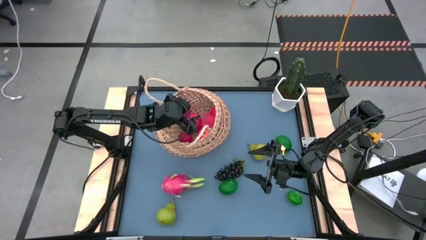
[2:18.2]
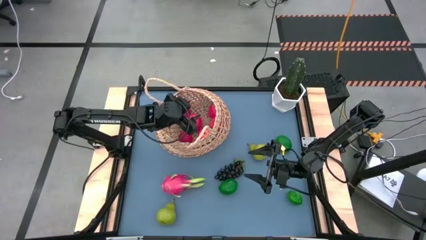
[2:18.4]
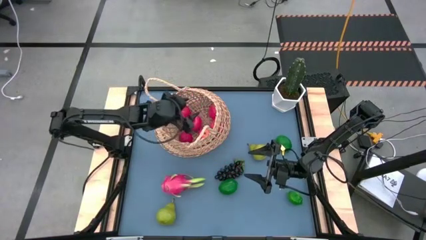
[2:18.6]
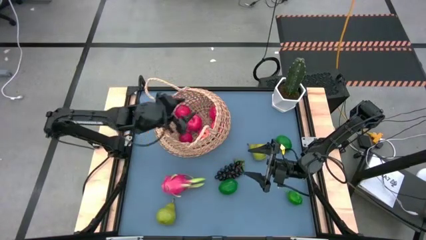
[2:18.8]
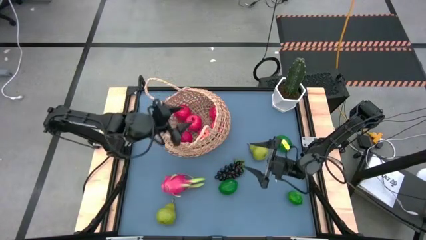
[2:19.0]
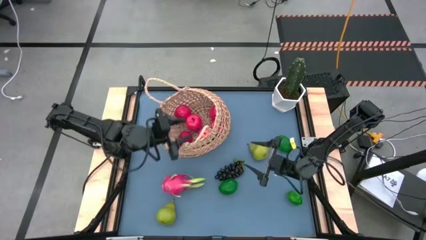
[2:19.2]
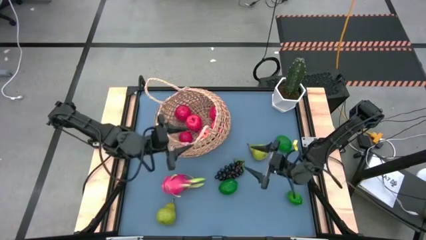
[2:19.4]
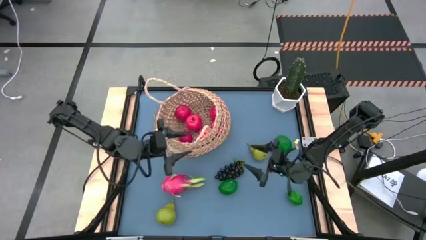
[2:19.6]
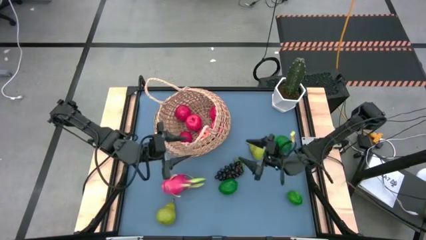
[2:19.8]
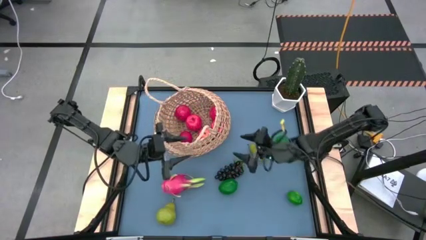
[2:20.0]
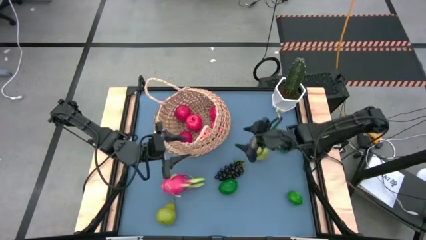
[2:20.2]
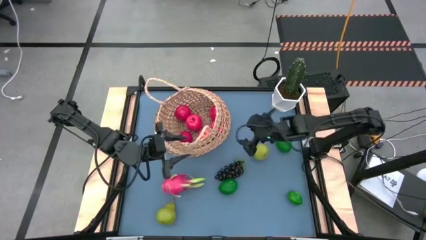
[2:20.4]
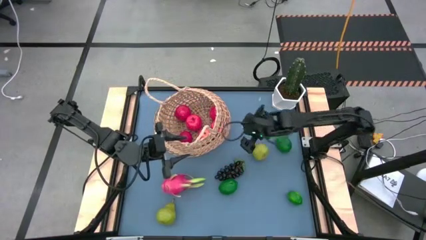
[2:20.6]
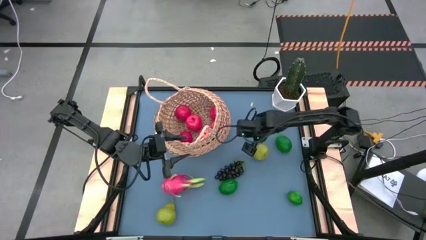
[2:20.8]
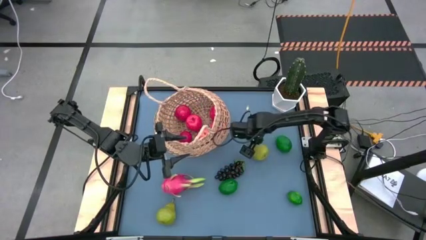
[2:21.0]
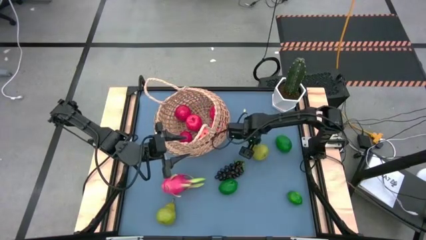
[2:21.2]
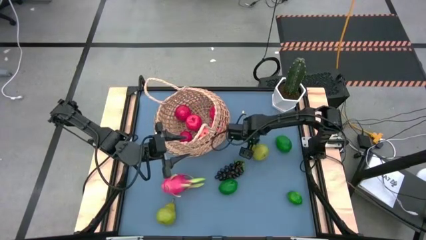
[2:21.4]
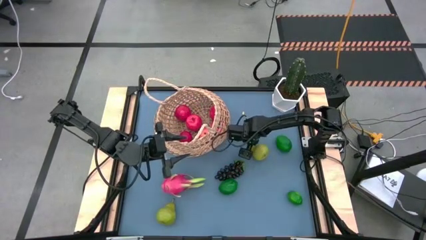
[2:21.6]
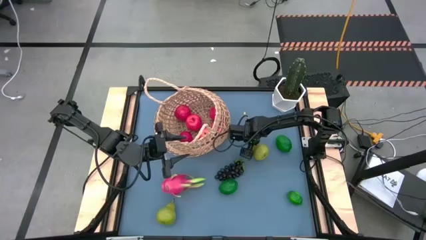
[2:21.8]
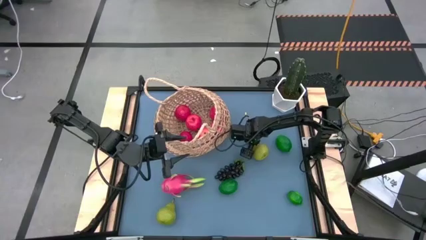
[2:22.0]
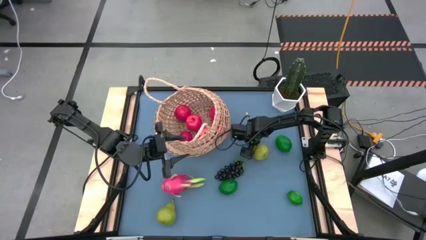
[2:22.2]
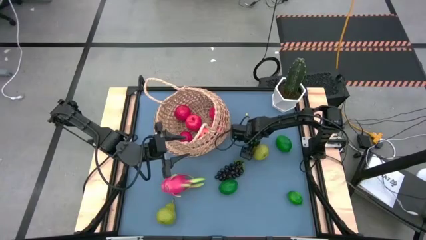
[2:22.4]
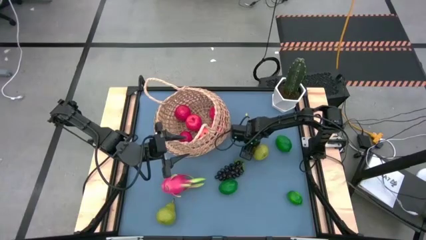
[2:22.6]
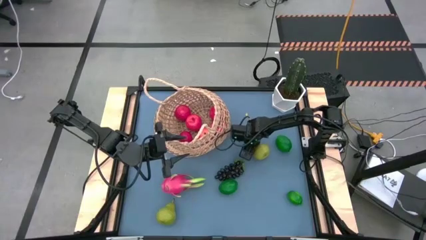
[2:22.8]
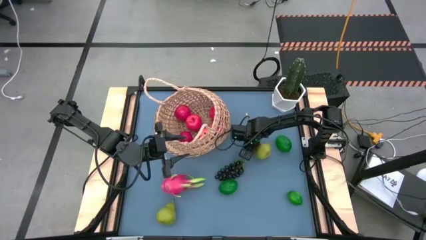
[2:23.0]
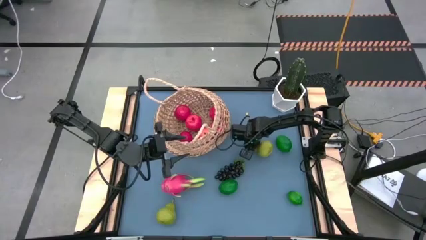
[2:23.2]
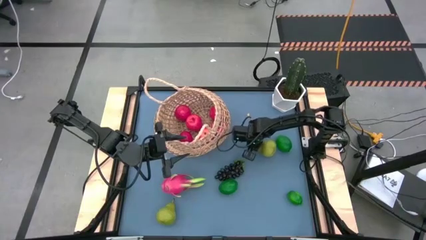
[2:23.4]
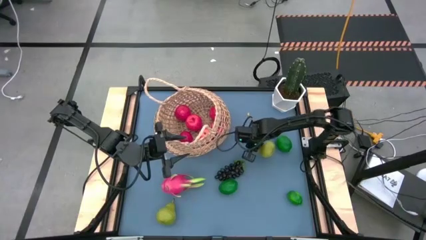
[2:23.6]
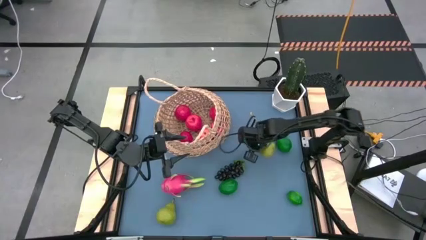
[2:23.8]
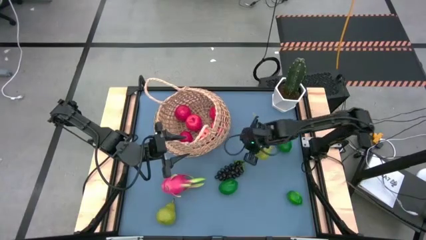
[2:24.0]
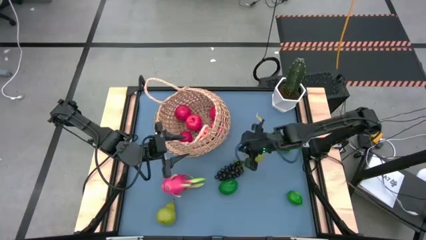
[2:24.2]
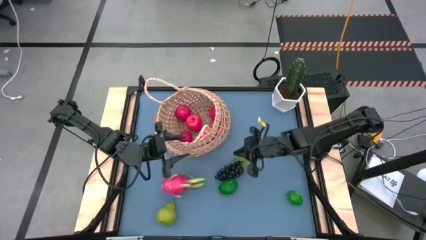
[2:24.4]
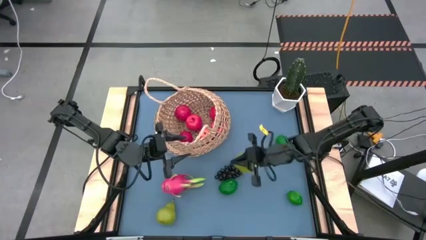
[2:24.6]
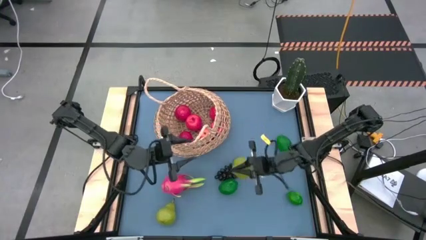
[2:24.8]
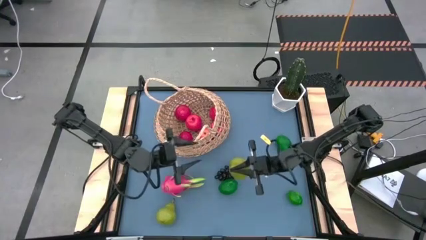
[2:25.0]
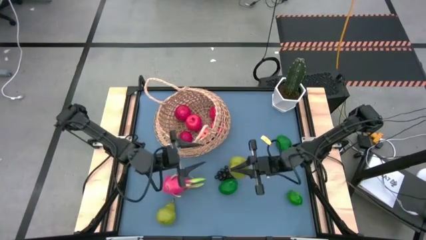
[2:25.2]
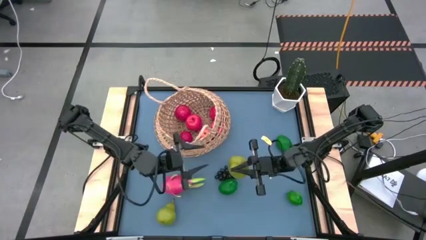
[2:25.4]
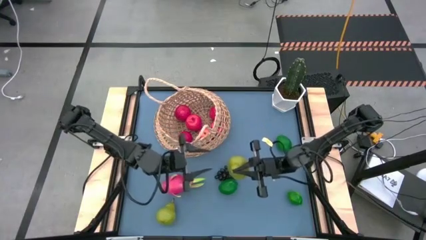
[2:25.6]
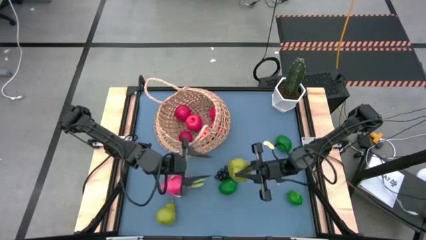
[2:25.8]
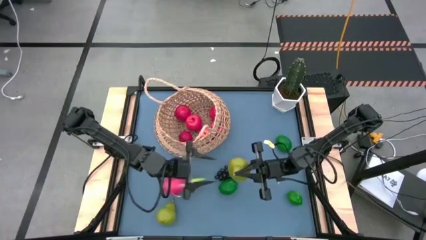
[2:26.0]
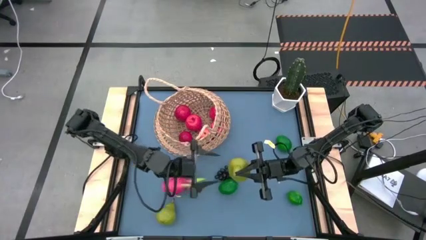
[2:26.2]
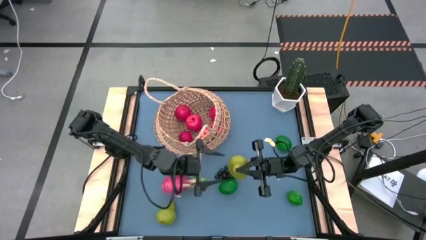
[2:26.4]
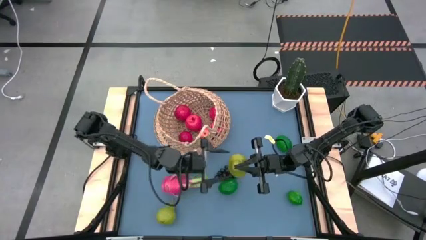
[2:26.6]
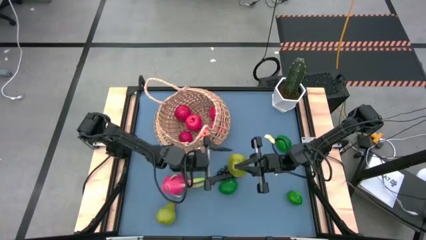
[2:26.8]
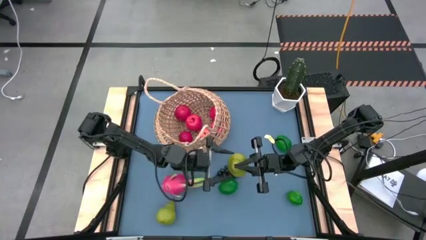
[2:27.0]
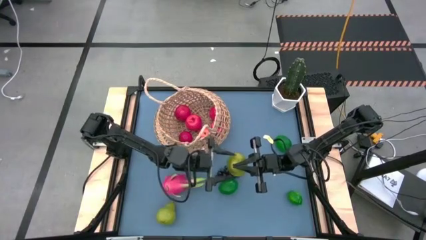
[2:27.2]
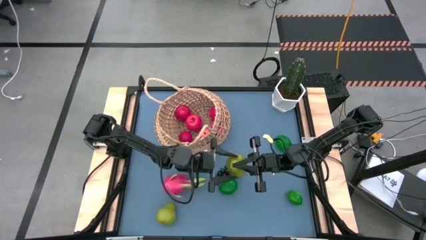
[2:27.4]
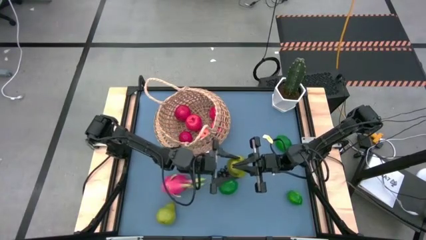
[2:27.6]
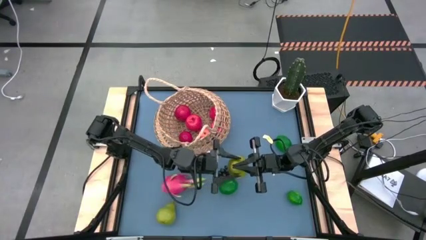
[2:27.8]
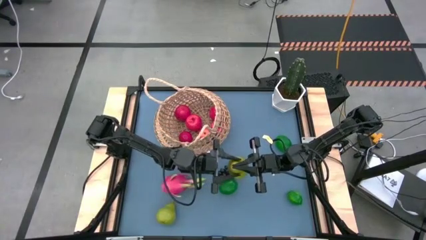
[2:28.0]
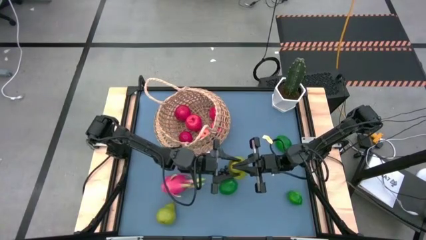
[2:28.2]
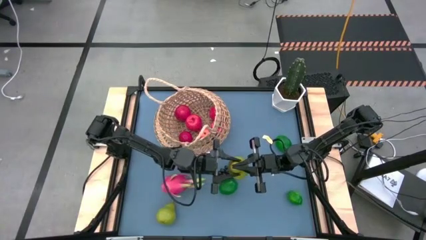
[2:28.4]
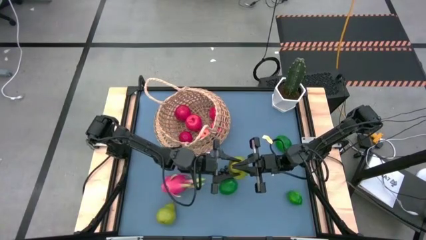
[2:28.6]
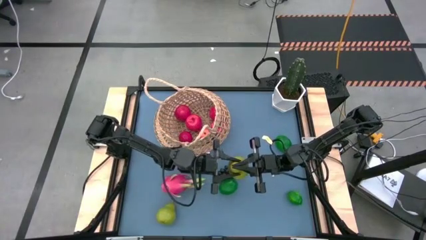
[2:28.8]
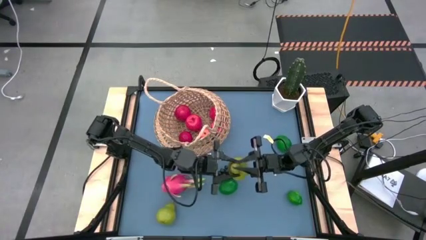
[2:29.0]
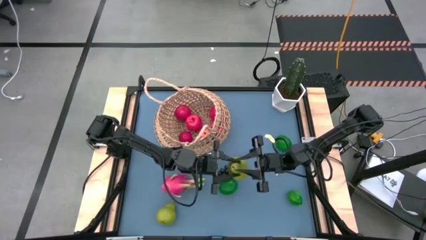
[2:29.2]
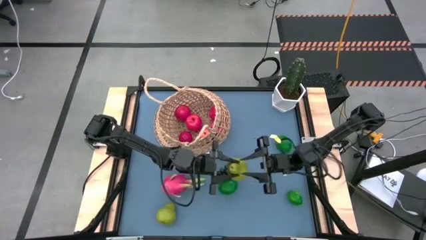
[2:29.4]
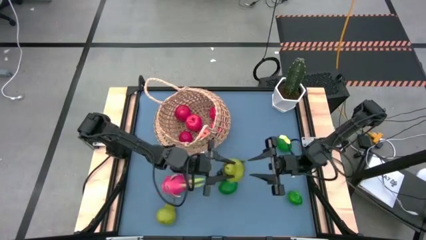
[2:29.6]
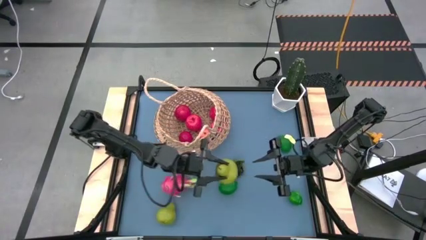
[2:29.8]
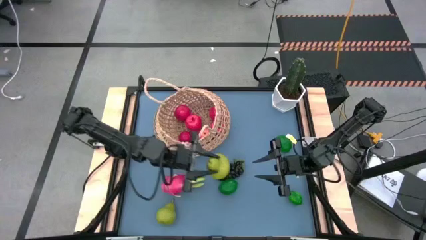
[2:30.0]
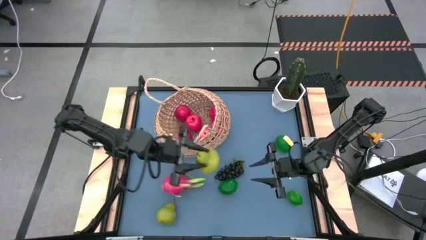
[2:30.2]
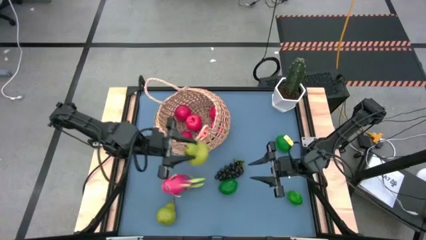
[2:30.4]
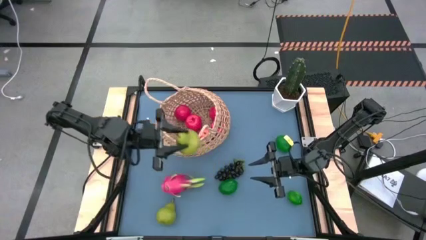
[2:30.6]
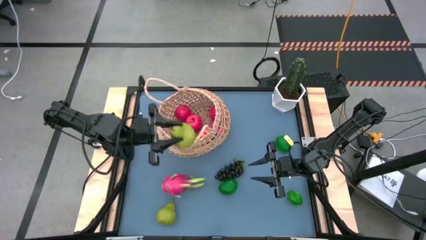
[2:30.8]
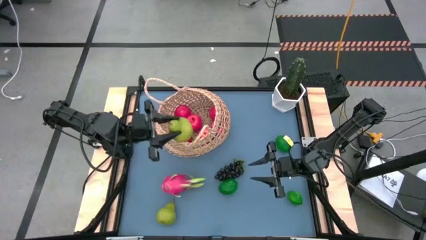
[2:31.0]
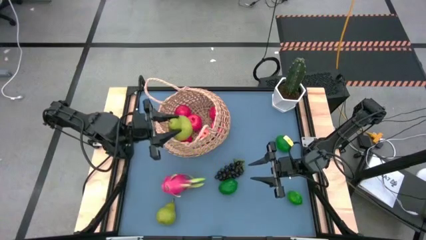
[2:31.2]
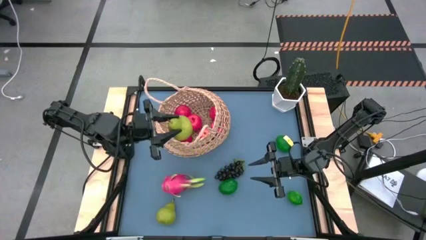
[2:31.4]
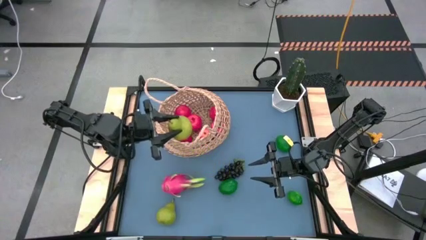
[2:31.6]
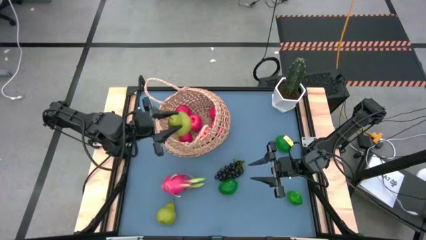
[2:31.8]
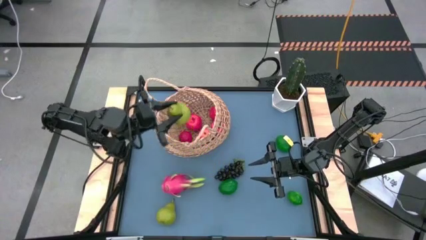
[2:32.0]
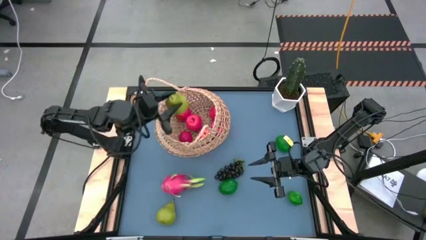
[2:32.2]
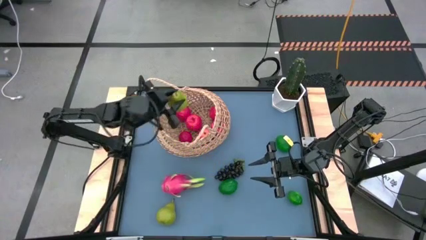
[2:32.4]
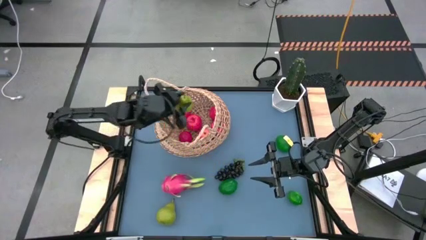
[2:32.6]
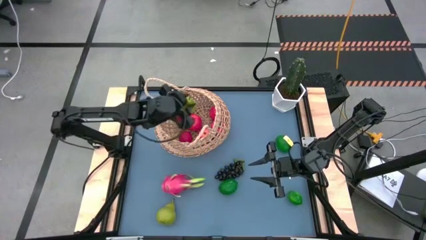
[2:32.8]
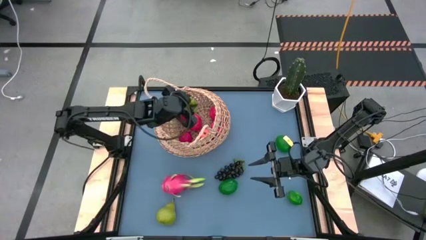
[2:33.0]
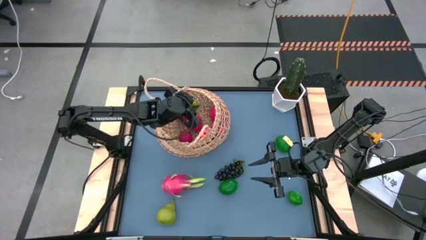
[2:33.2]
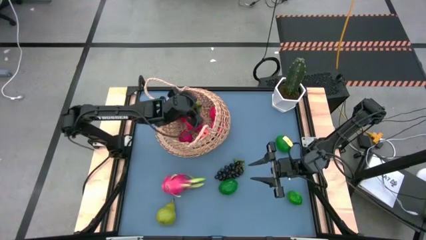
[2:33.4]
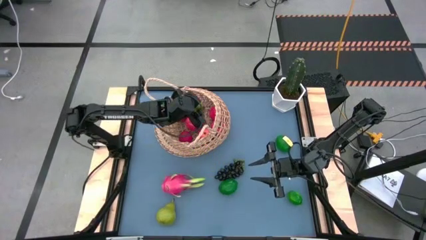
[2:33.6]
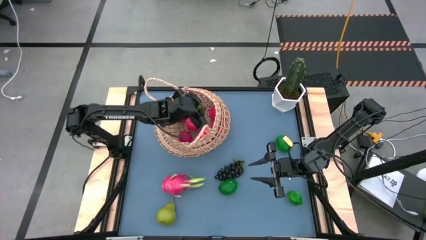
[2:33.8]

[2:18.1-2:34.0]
Task: Build produce basket
Put the green pear into the basket
